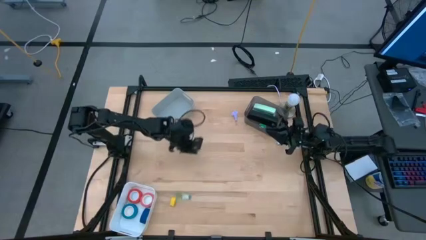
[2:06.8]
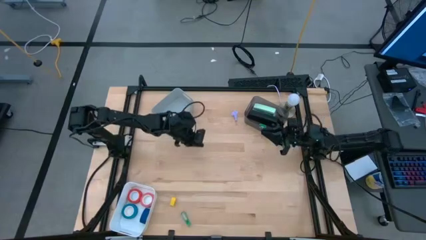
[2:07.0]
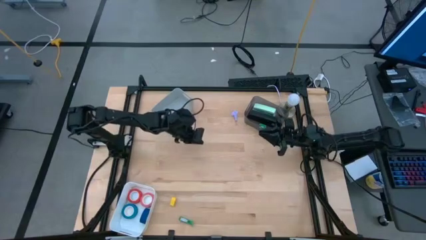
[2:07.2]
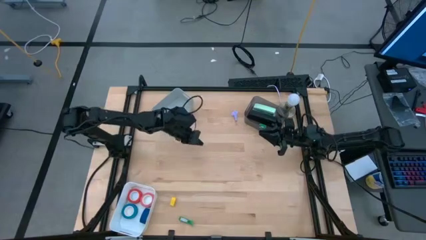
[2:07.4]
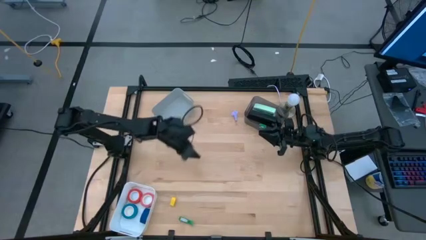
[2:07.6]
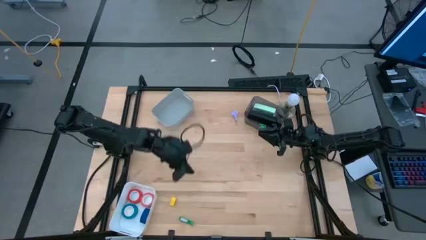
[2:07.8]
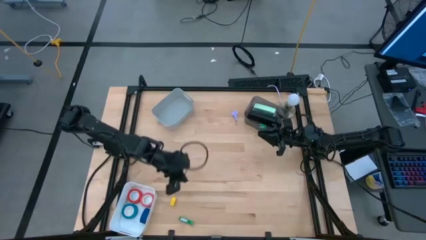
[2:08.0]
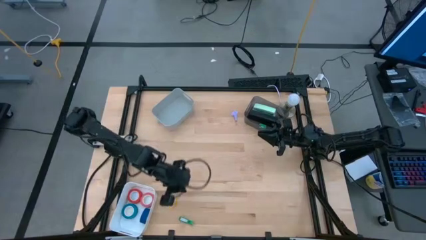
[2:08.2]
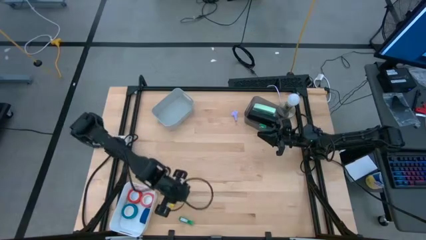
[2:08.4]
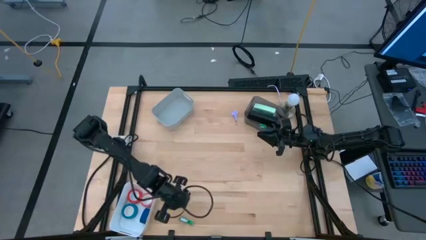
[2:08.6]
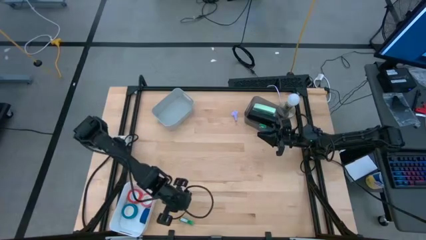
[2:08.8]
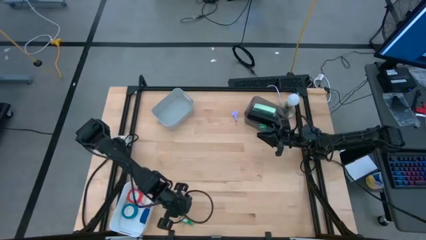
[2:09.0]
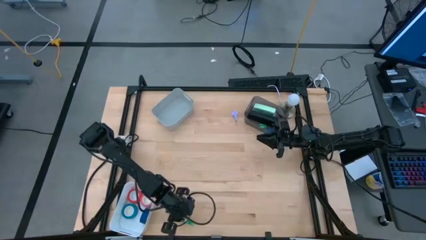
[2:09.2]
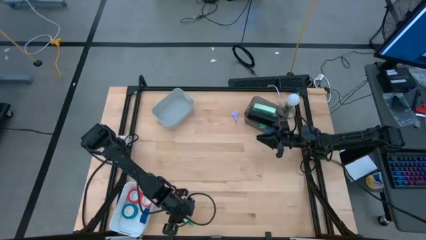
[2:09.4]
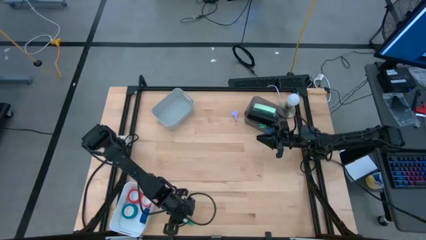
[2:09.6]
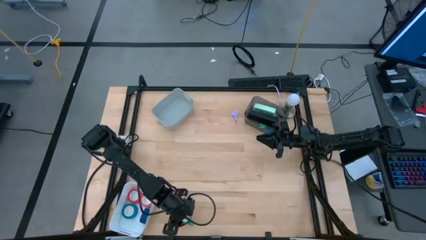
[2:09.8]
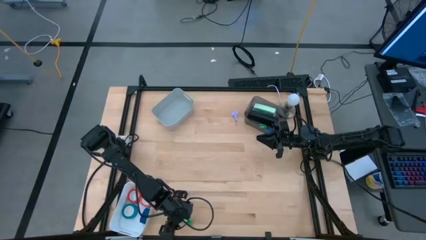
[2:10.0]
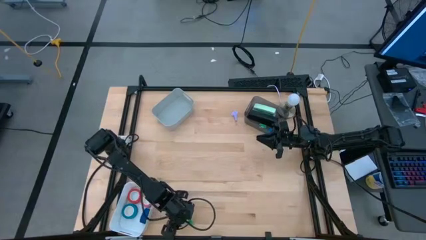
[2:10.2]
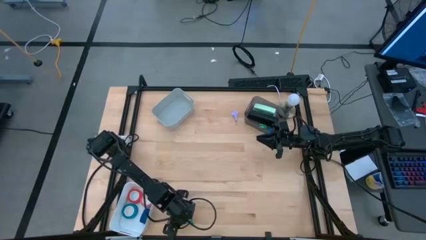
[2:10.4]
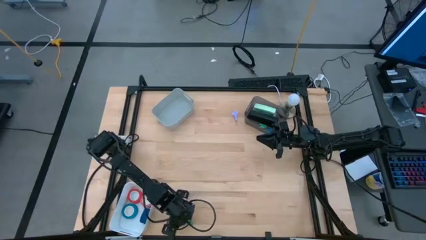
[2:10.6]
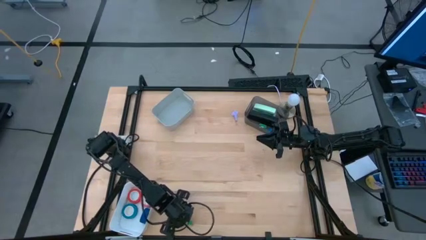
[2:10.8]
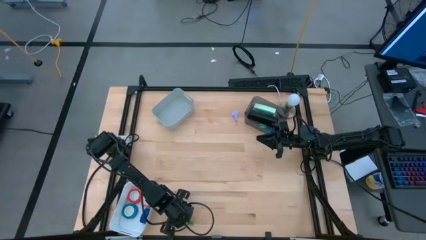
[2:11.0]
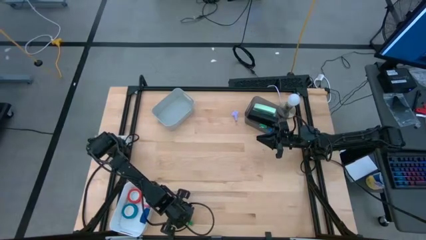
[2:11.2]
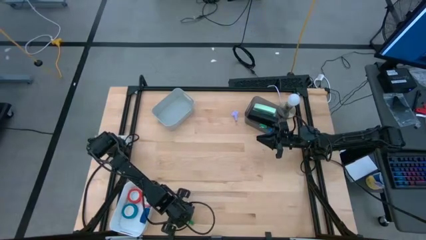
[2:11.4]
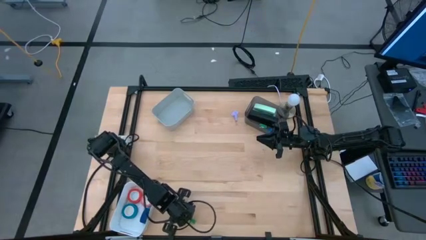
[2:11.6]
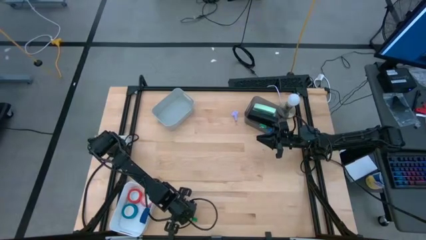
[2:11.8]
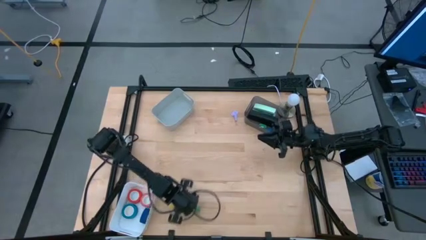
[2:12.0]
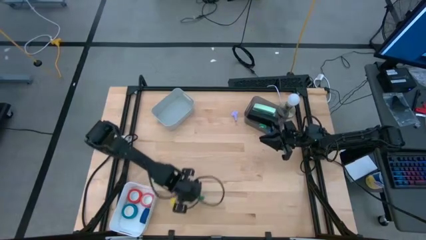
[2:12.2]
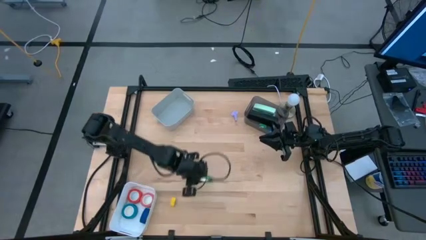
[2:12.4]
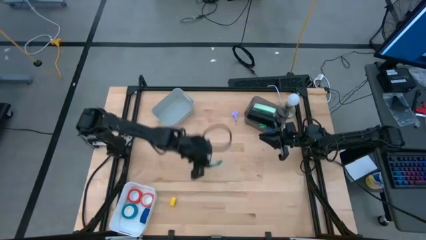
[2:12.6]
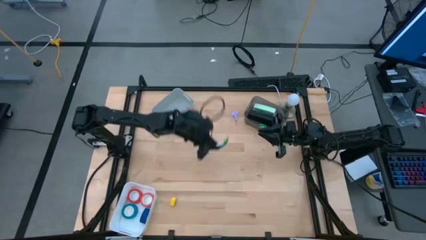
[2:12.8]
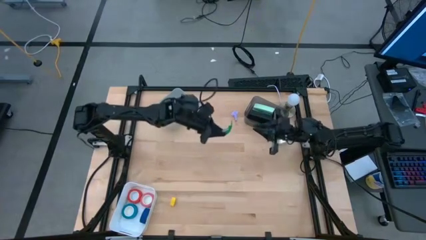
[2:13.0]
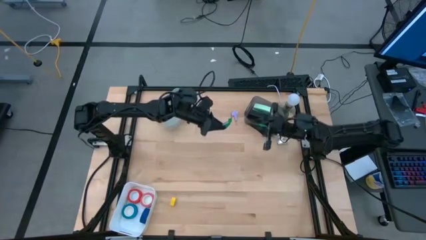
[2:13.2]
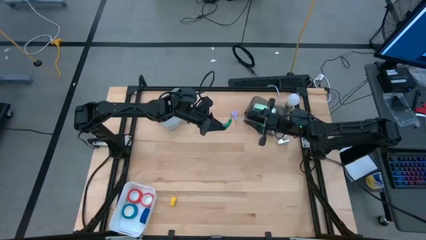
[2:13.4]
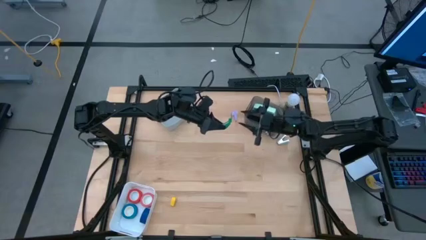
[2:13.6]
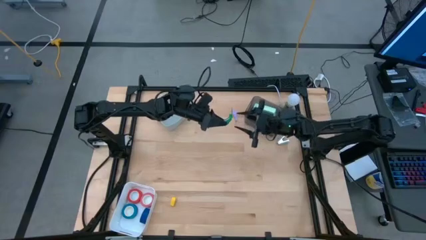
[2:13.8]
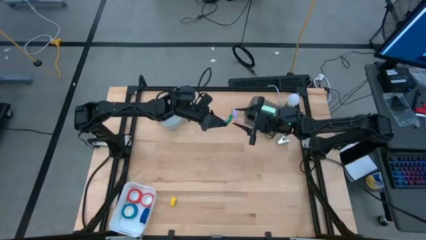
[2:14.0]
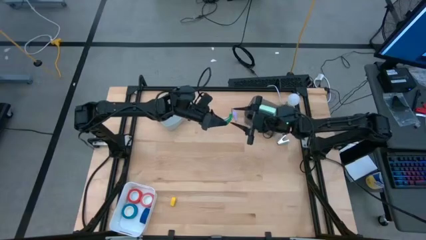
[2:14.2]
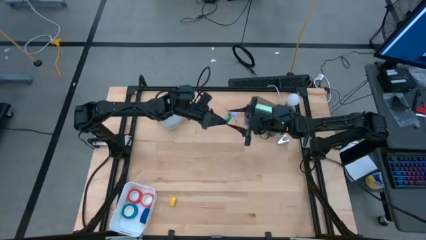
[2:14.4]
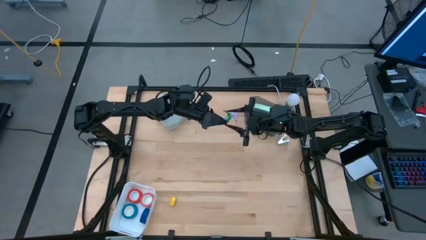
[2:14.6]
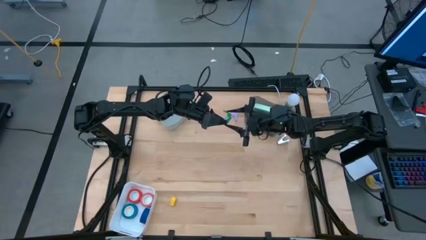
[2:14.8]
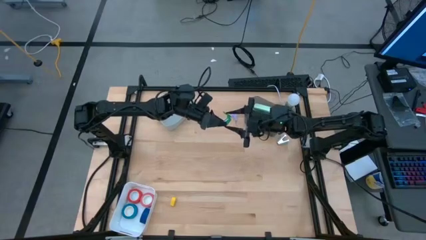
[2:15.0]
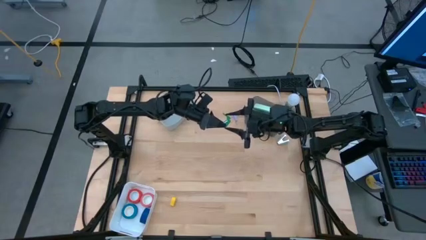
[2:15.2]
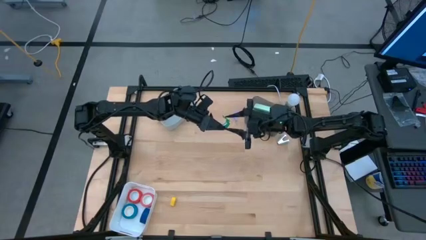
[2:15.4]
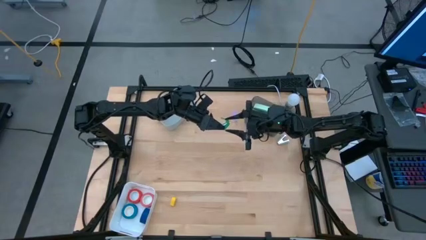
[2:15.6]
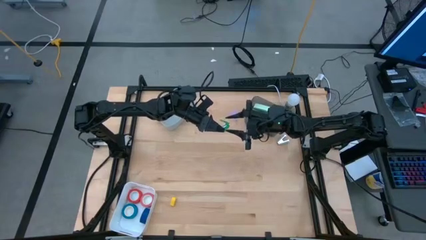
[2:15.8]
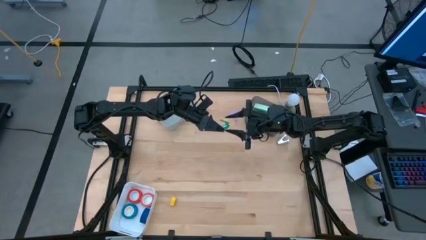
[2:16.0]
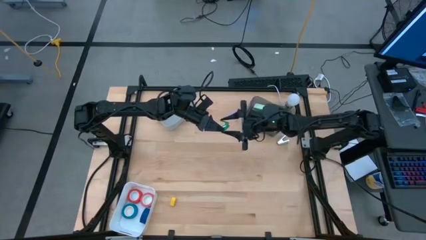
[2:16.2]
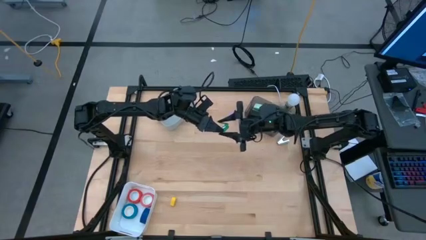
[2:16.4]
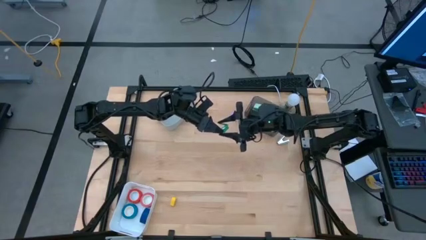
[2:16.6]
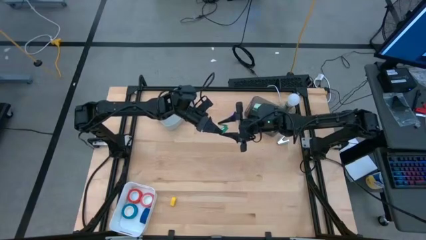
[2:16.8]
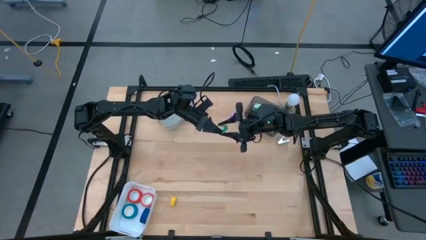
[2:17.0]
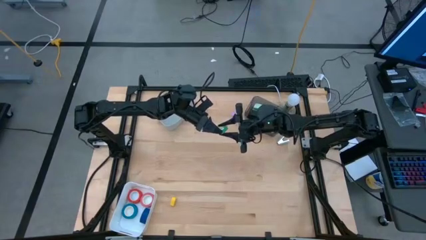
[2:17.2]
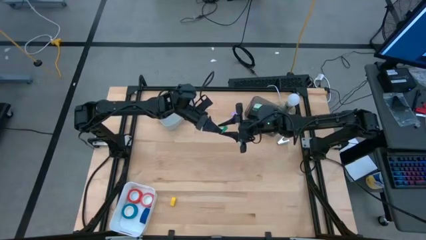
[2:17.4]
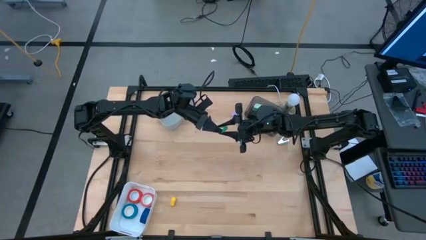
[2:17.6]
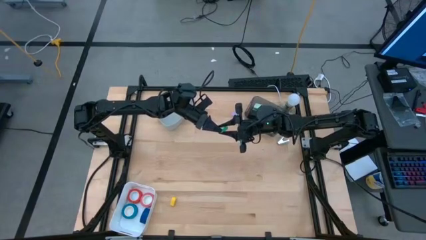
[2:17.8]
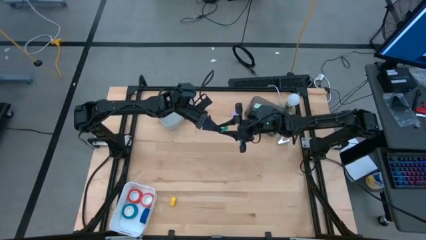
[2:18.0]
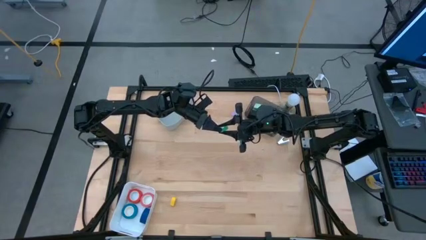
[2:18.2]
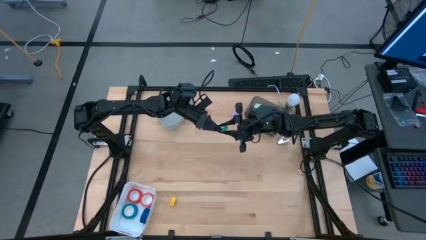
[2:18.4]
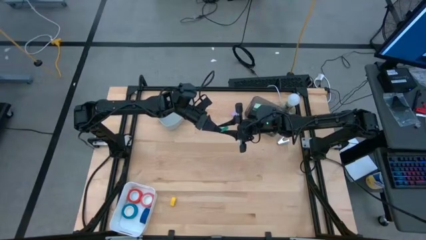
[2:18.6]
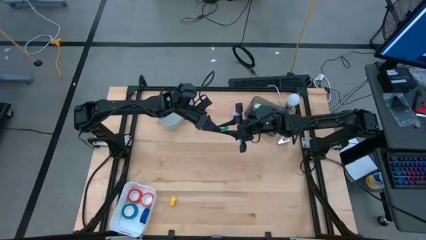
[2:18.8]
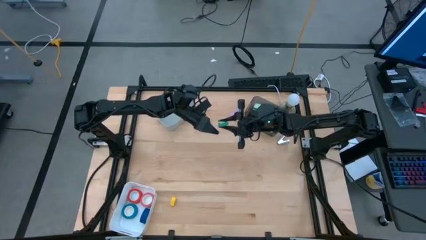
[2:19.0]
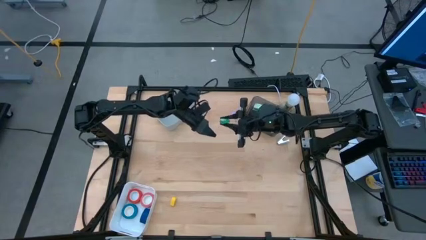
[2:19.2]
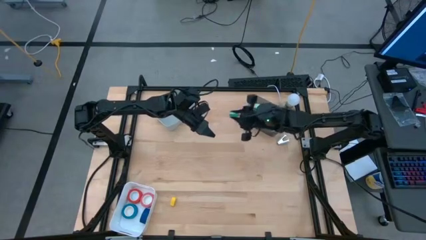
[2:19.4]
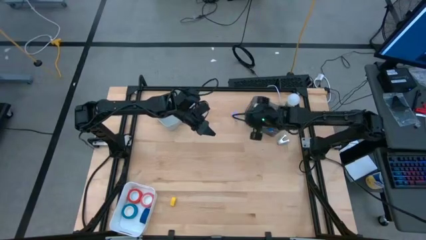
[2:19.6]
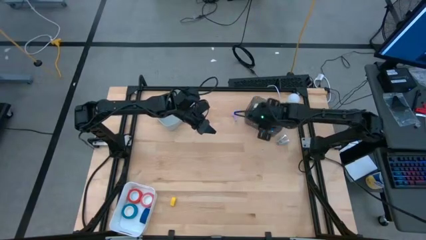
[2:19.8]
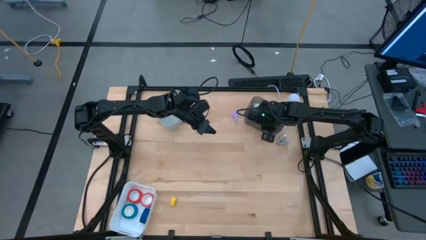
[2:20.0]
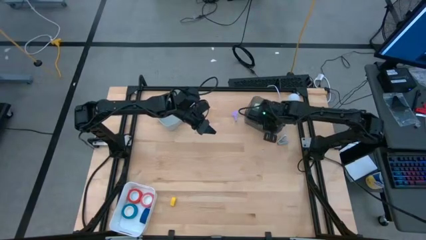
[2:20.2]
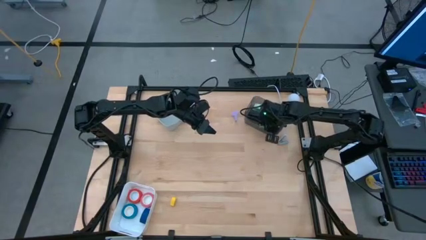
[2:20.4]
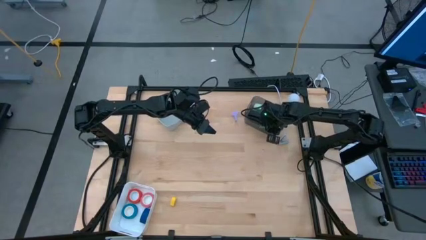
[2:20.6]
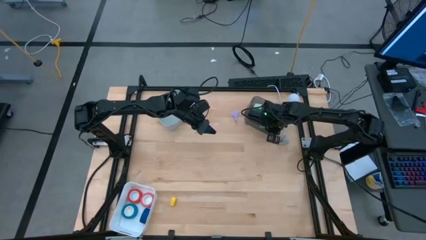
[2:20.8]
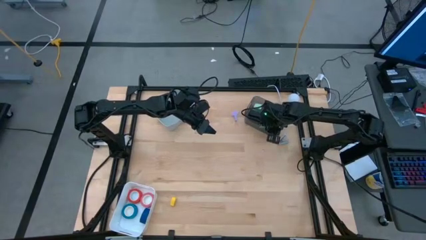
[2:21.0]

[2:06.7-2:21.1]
Task: Pick and place Stapler, Stapler remover, tape
Put the small green stapler into the black bin

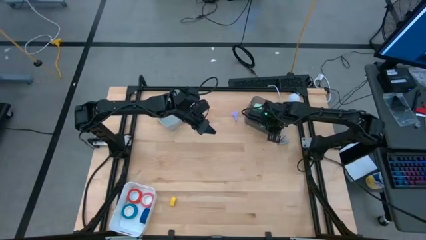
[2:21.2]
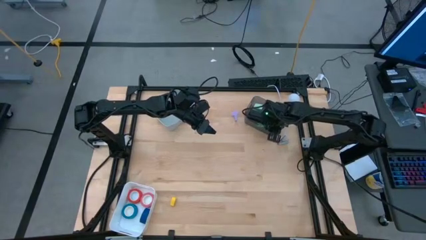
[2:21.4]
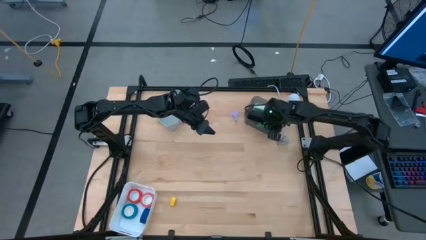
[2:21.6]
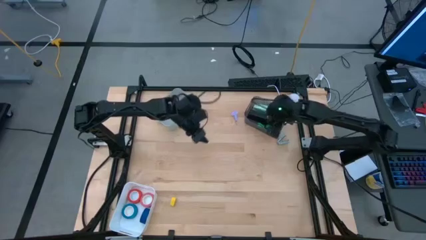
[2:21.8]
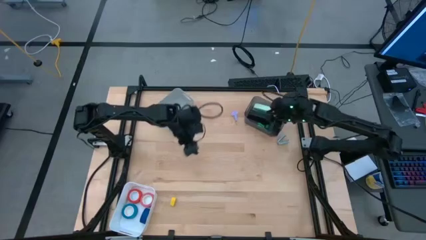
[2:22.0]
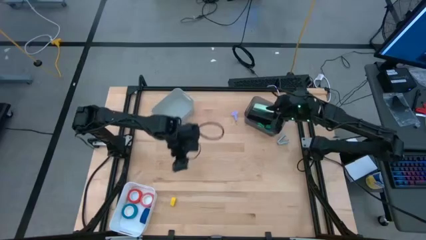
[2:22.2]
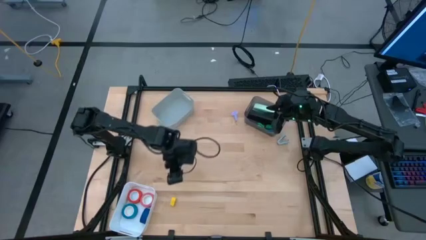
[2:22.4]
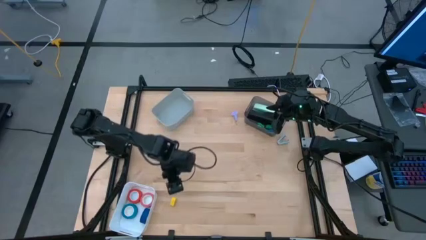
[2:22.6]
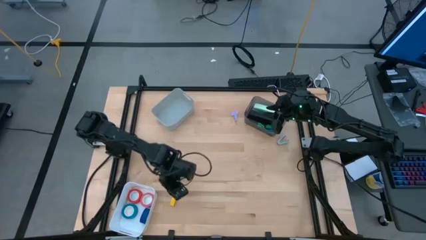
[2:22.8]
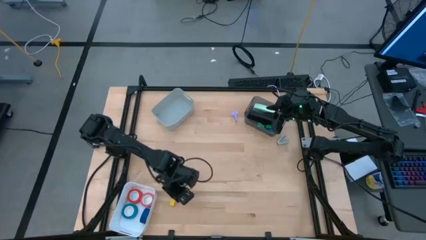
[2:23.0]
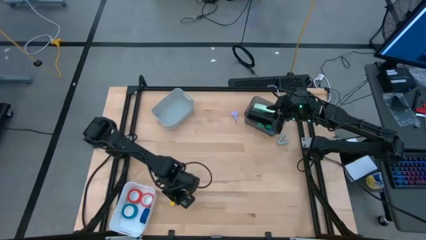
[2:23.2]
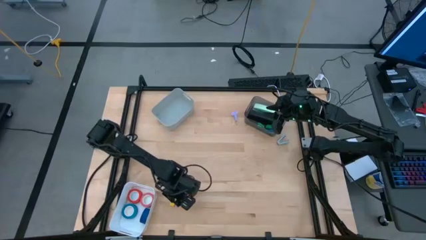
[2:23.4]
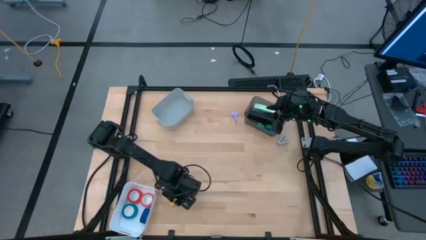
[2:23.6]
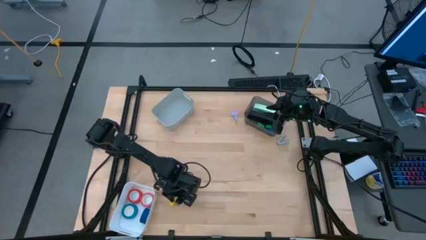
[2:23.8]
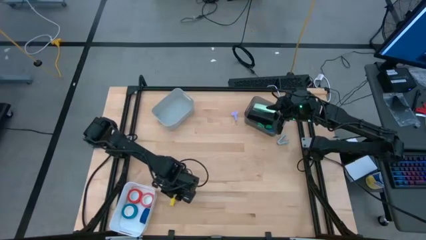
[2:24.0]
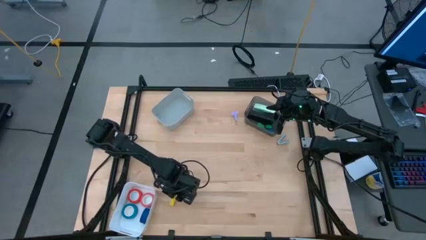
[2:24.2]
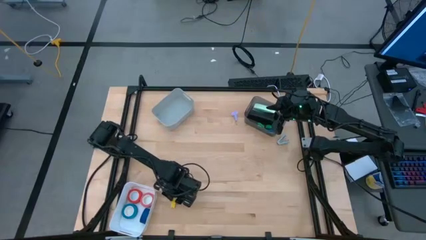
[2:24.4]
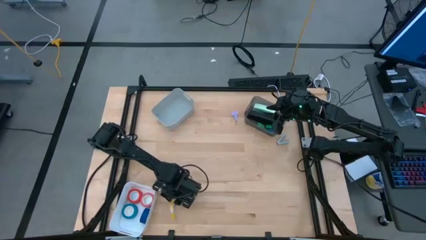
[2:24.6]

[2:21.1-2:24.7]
Put the small yellow stapler into the black bin
